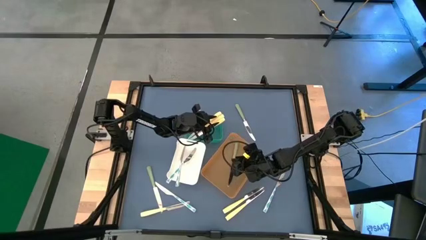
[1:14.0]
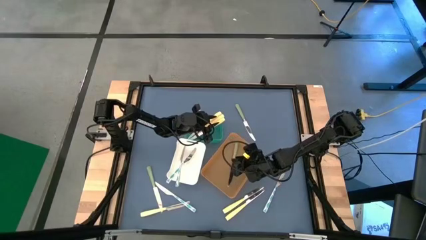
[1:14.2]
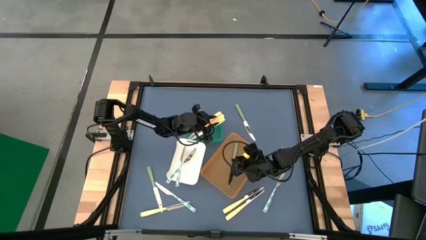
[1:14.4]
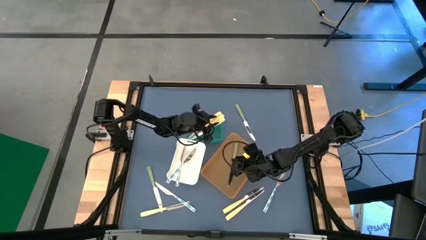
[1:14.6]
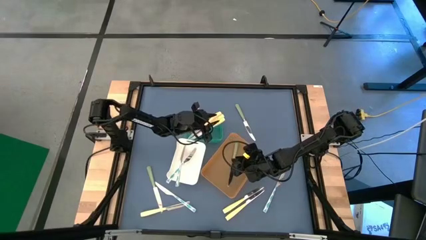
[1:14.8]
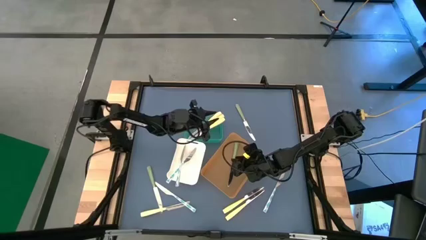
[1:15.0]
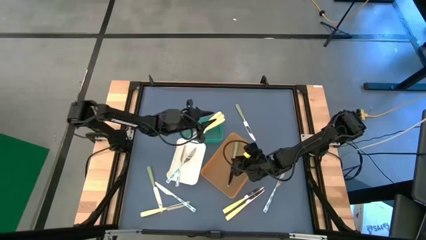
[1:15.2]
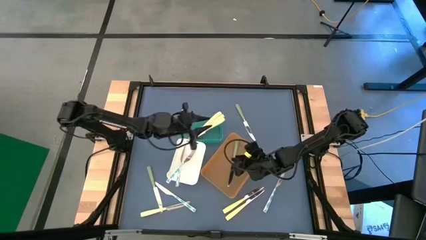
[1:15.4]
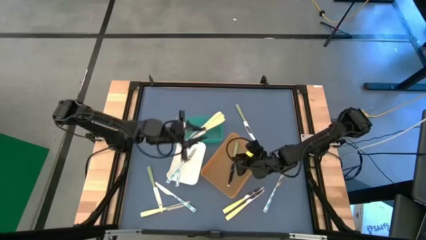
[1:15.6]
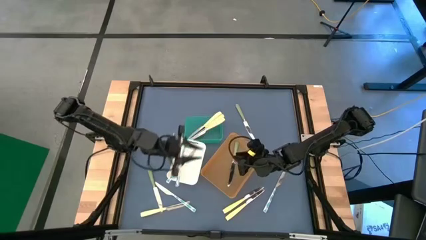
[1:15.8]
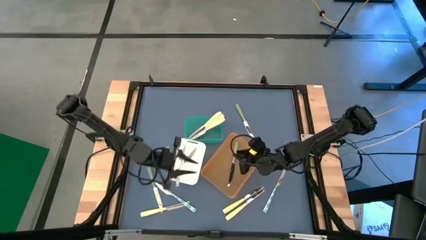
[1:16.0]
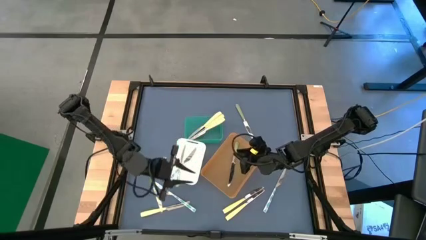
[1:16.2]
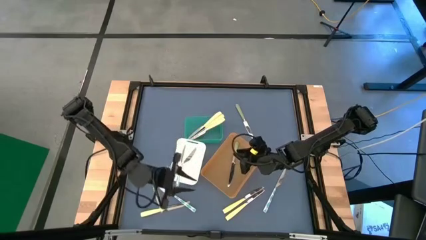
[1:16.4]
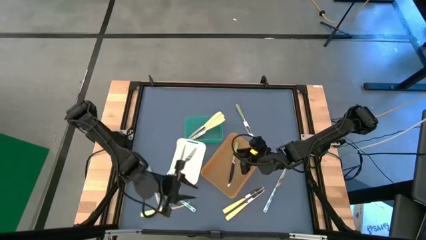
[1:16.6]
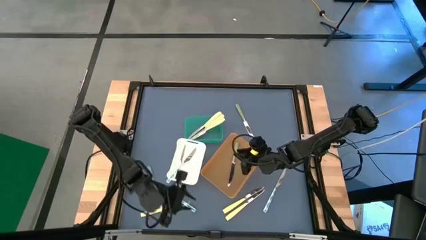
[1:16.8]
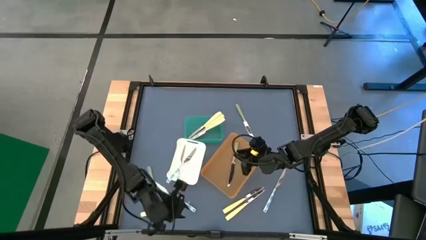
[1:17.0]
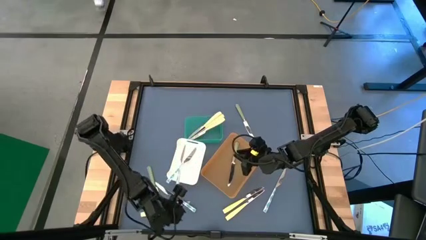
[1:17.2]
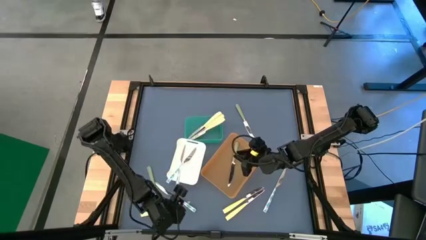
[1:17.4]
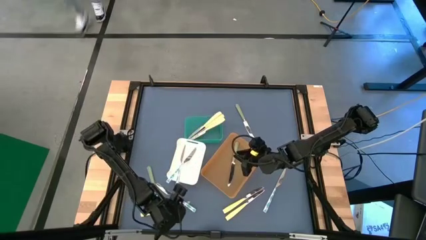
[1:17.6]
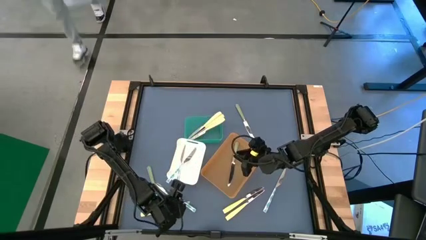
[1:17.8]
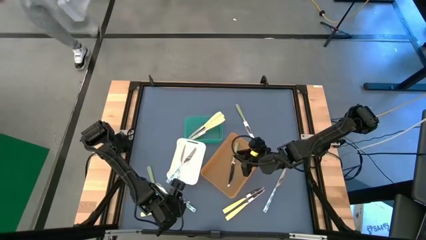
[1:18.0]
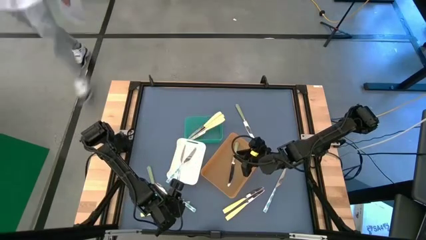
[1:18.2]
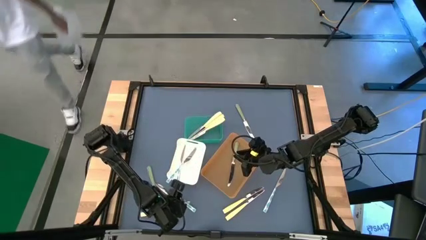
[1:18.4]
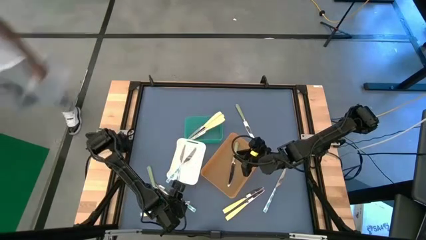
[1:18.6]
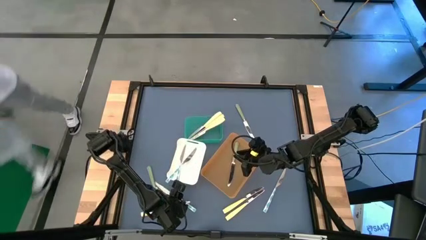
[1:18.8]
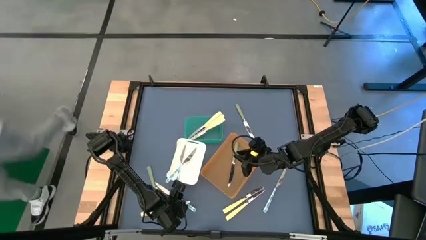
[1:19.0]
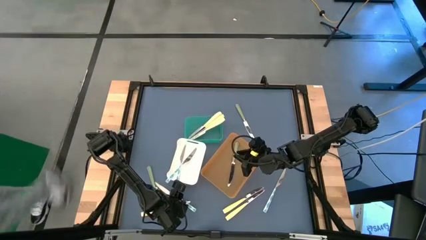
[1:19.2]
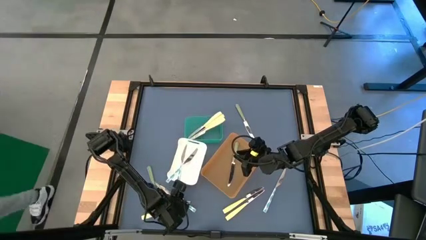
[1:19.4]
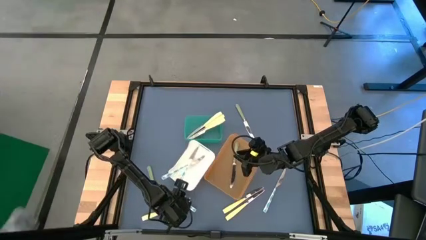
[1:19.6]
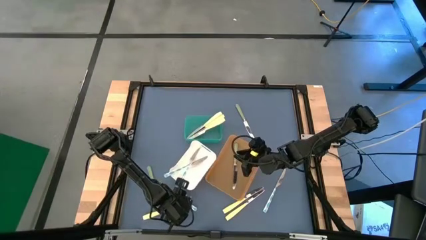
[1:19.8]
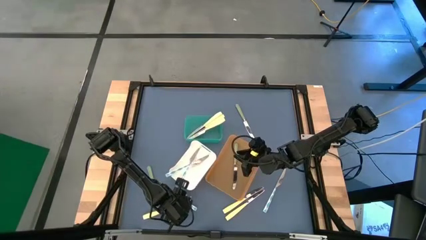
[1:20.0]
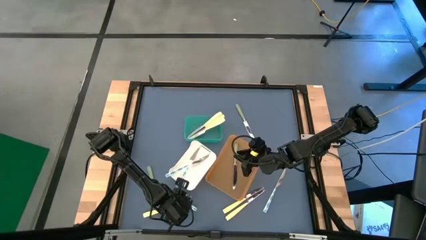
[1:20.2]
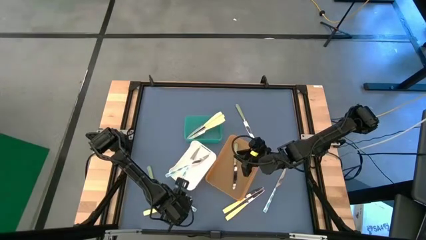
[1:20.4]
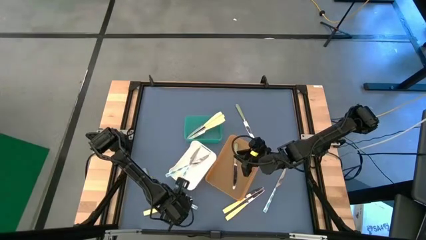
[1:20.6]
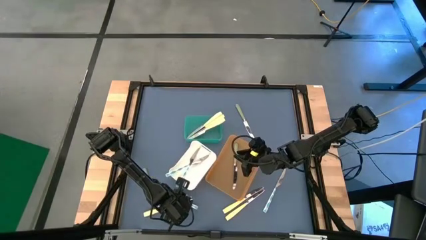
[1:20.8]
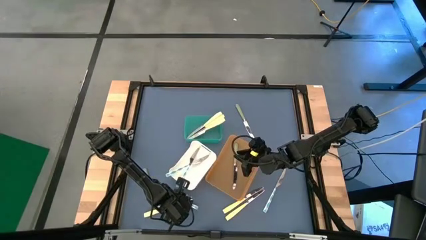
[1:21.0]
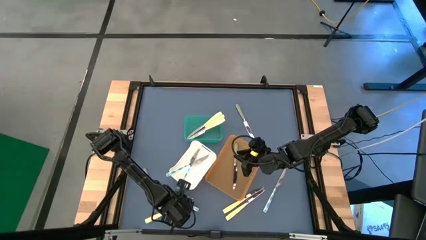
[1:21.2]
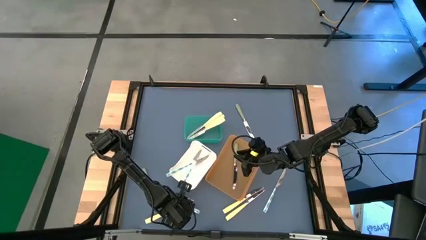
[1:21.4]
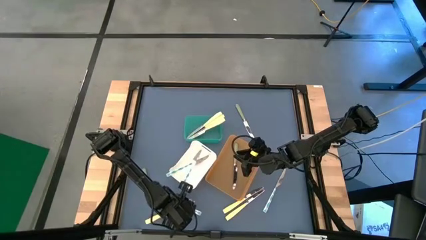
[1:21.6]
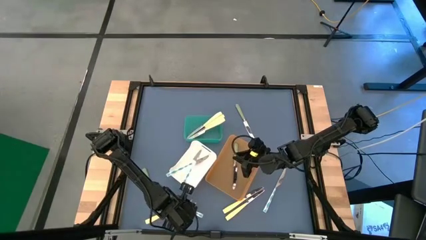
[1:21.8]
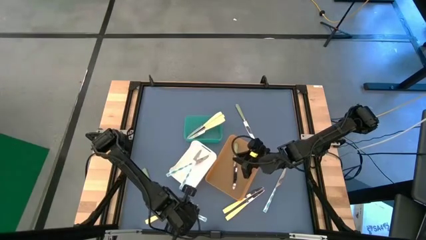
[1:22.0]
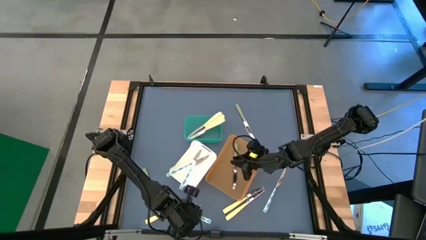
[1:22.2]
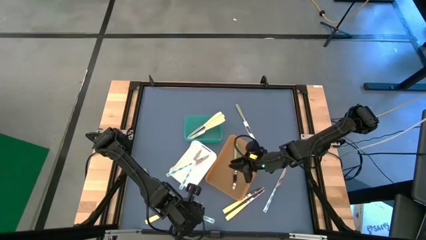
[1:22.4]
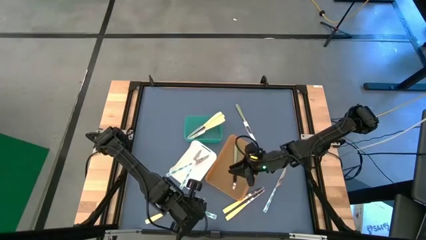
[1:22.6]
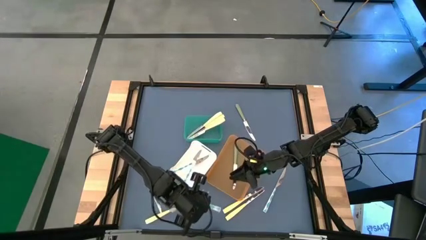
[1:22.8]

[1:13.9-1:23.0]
Task: Sort silverware by color (type)
Put the blue patterned knife into the white bin

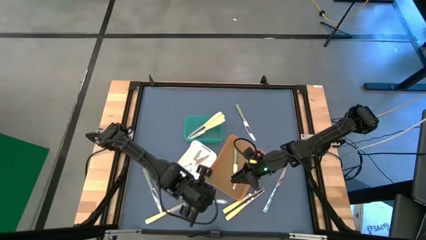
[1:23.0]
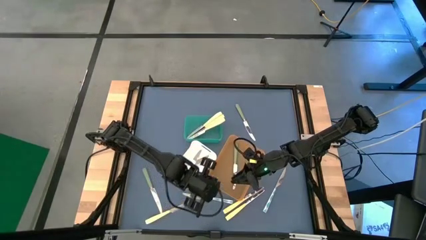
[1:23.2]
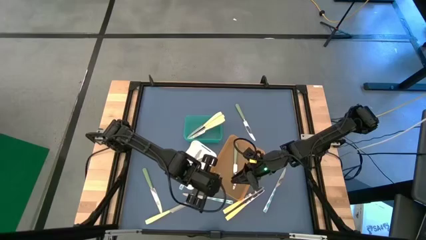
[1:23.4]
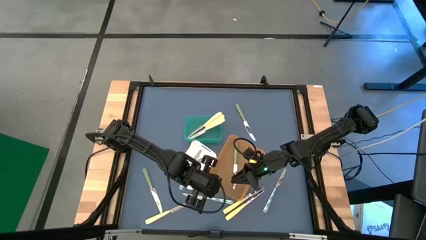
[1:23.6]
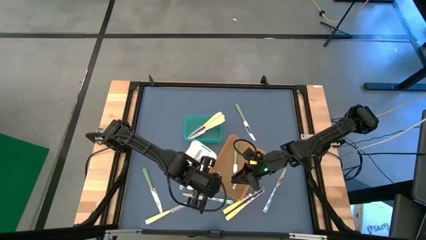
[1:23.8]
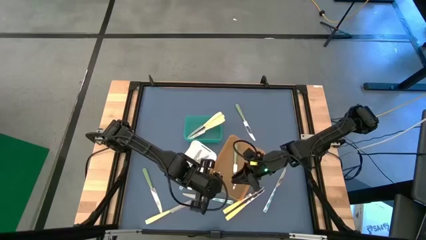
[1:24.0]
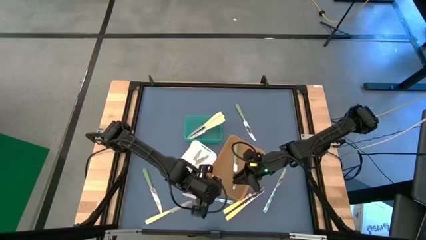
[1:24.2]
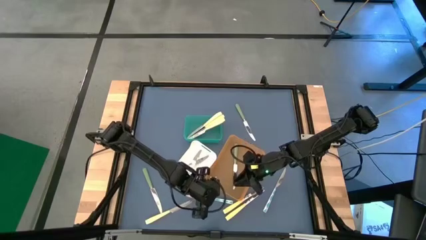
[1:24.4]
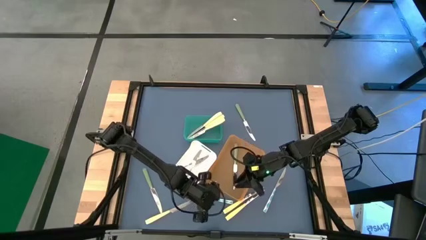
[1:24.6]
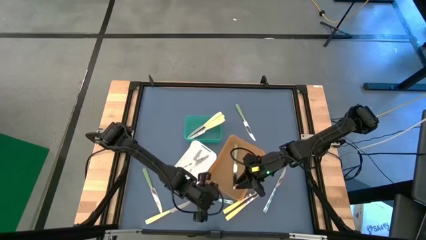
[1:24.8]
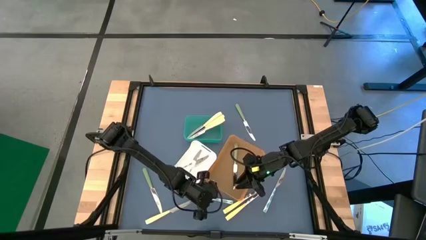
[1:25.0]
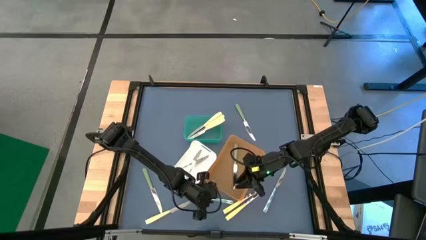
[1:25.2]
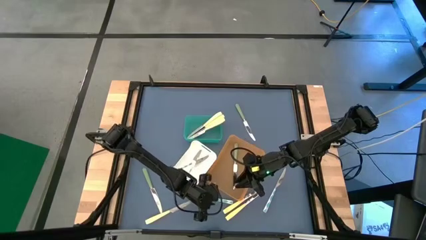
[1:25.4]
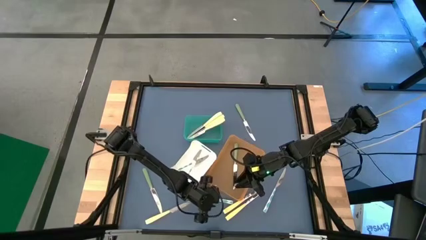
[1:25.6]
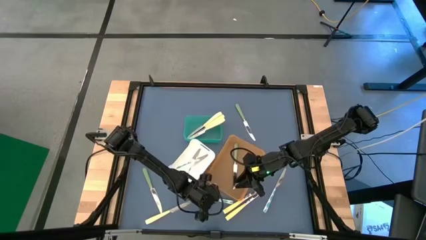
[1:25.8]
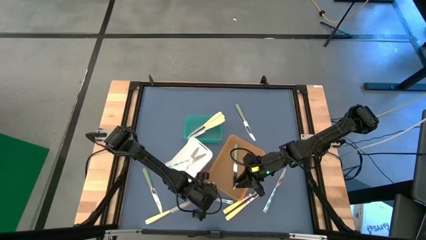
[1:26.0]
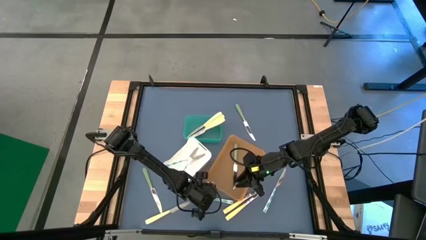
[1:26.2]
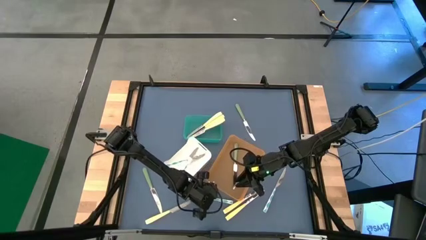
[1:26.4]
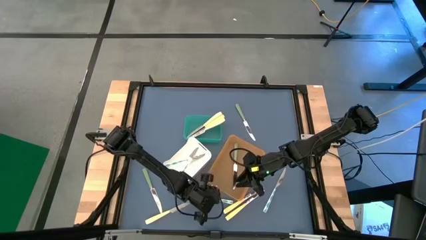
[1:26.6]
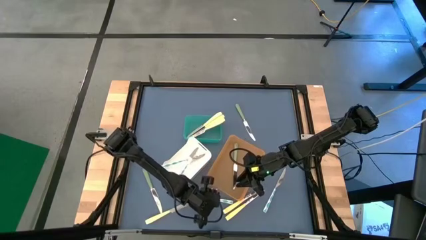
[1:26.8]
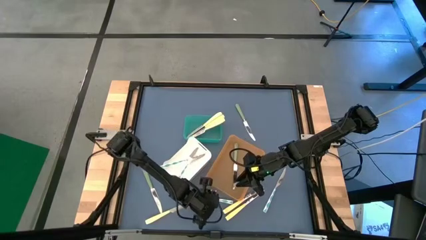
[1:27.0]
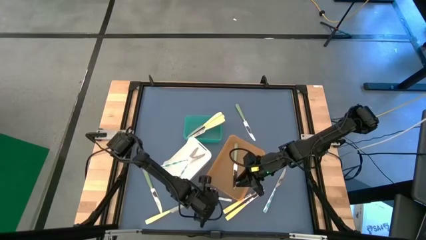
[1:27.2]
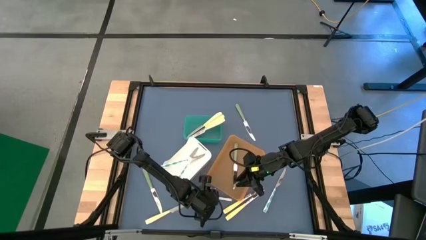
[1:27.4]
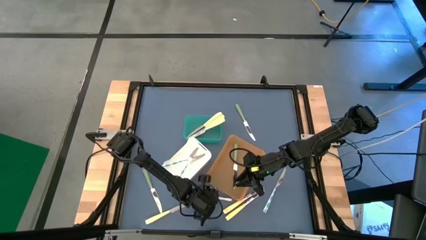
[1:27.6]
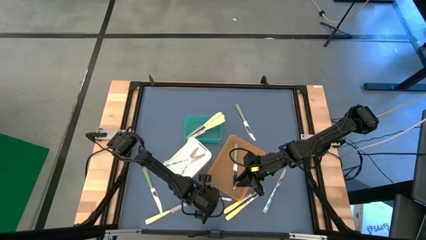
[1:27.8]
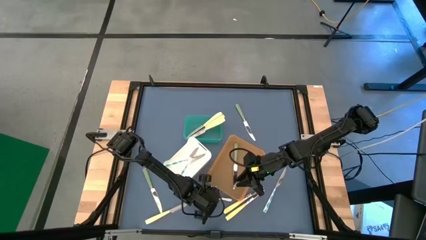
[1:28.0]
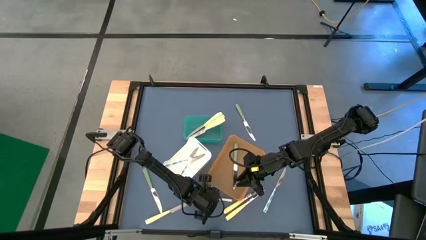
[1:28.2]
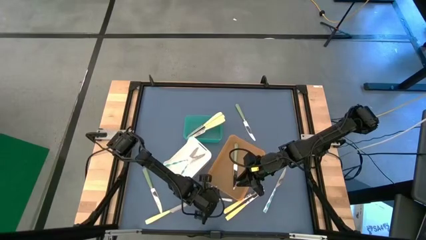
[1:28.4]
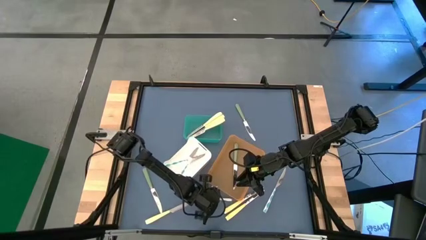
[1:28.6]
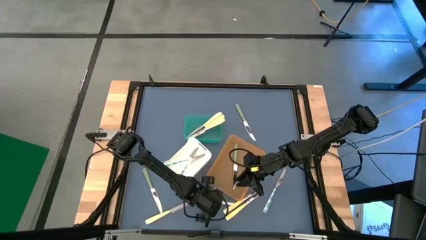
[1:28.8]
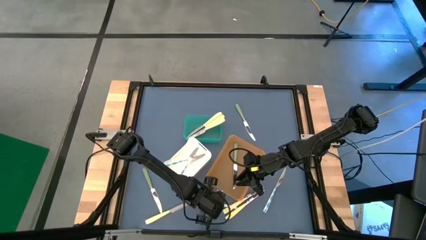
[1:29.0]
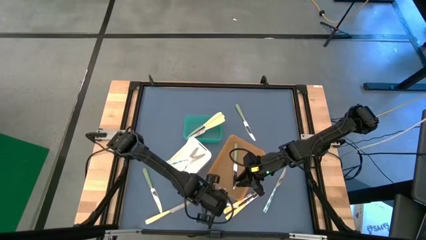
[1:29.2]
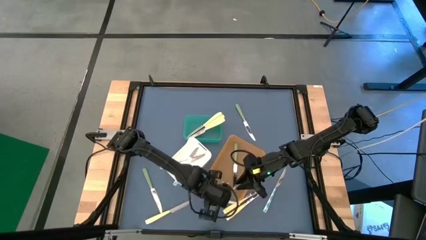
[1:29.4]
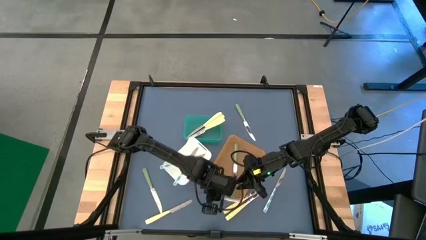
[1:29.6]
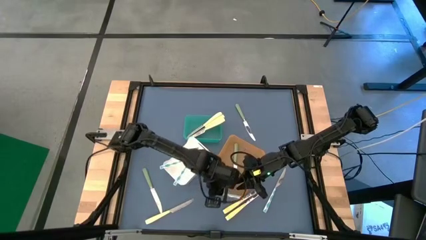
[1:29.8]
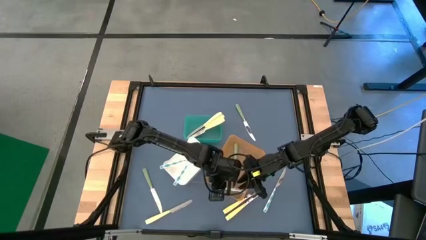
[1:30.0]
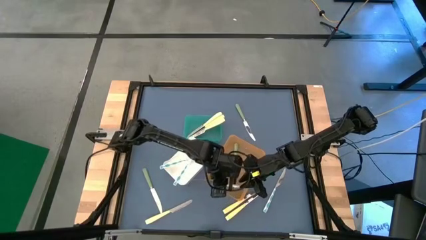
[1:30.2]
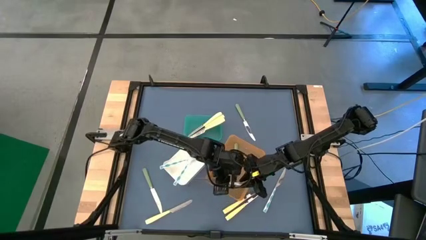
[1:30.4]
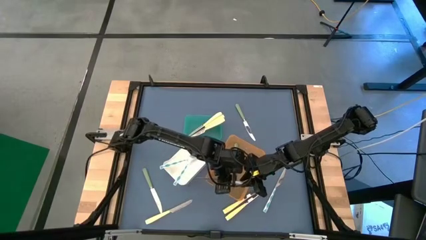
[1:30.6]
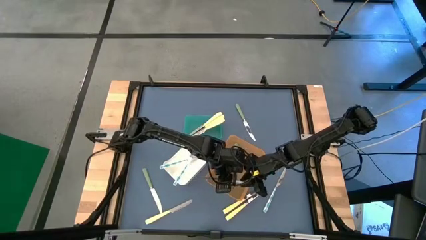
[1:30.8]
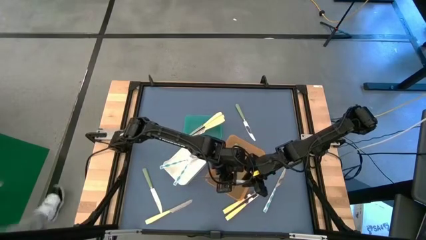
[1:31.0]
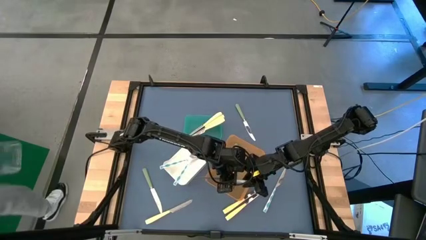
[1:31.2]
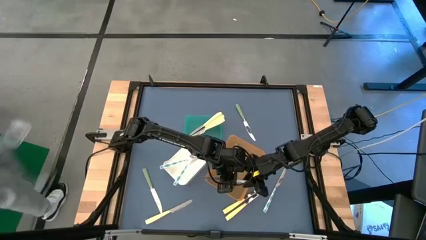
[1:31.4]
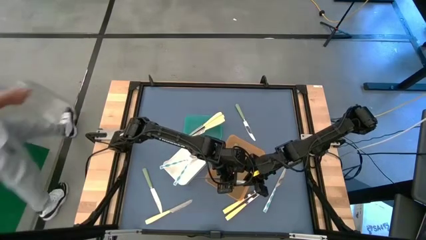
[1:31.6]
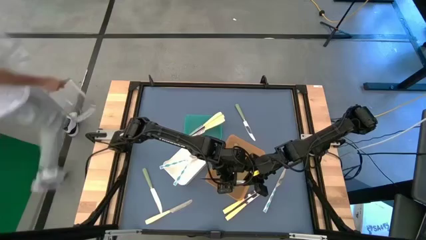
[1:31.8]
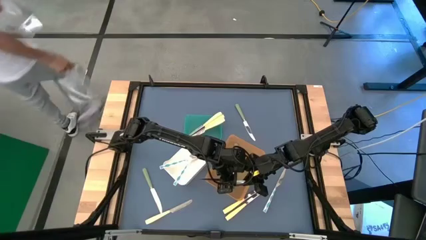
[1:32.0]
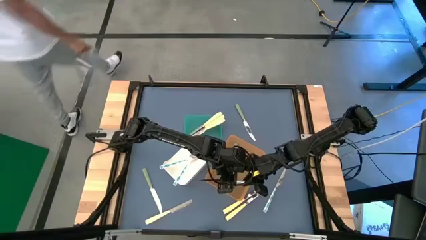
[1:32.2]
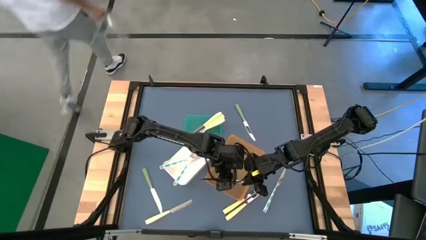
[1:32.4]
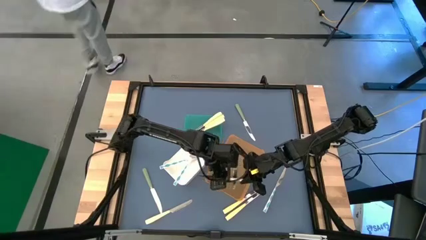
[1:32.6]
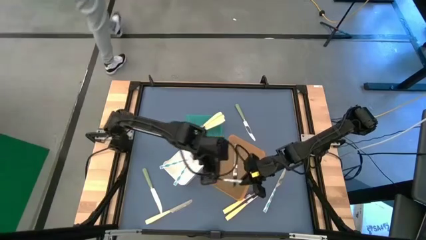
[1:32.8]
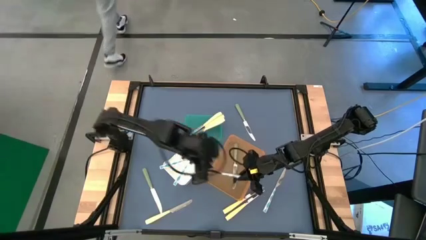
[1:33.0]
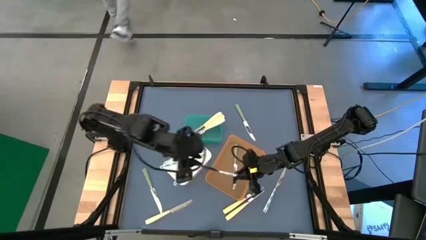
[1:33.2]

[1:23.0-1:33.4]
Put the blue patterned knife into the white bin
